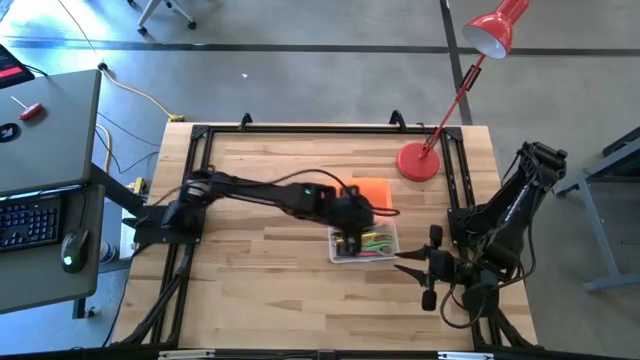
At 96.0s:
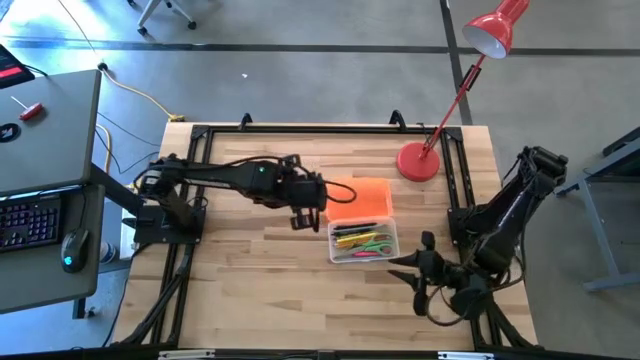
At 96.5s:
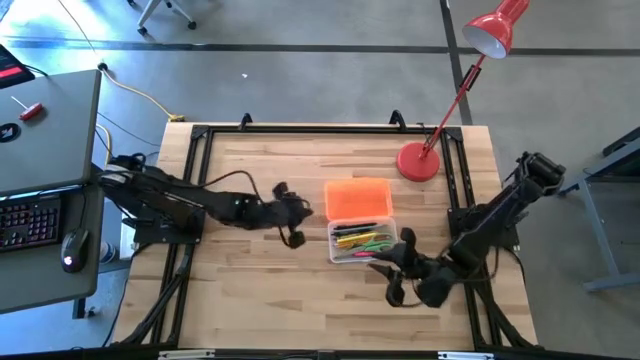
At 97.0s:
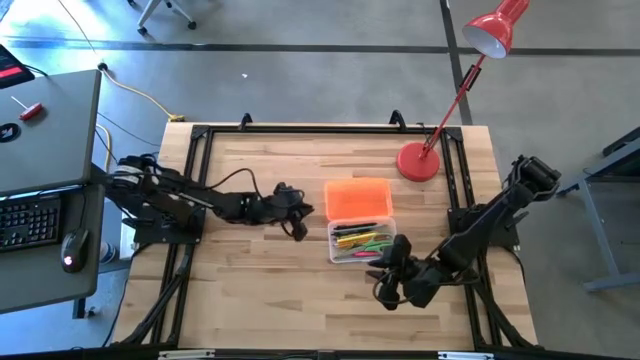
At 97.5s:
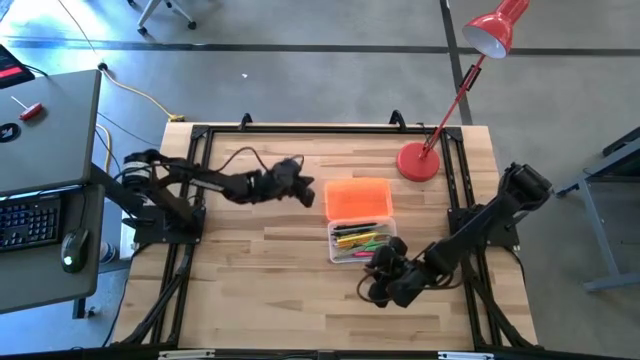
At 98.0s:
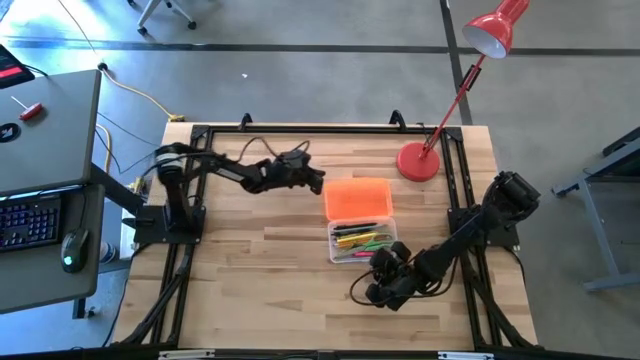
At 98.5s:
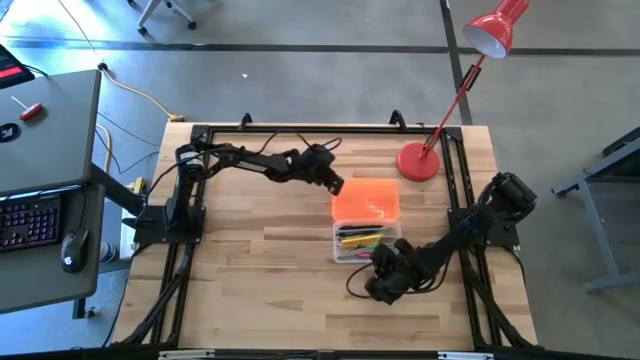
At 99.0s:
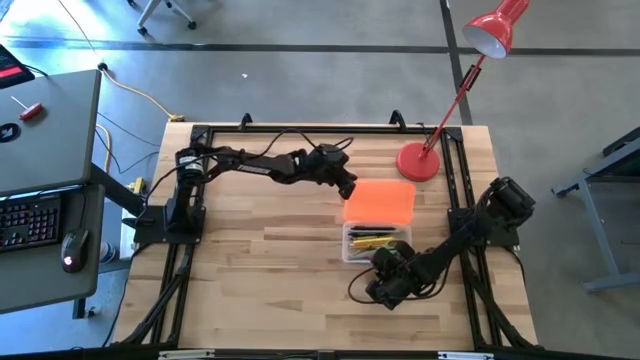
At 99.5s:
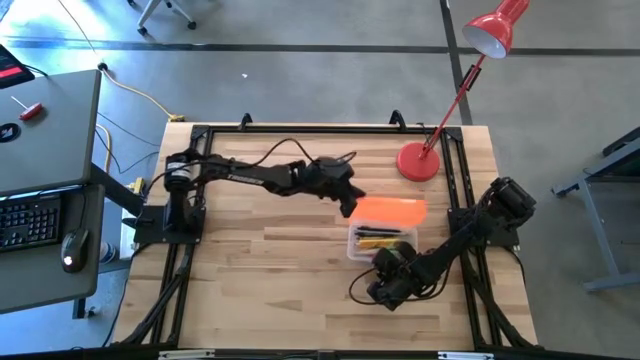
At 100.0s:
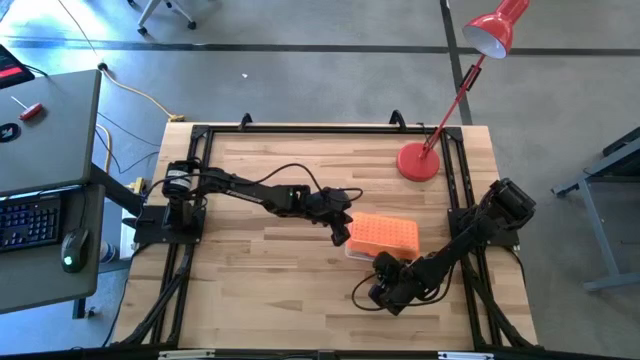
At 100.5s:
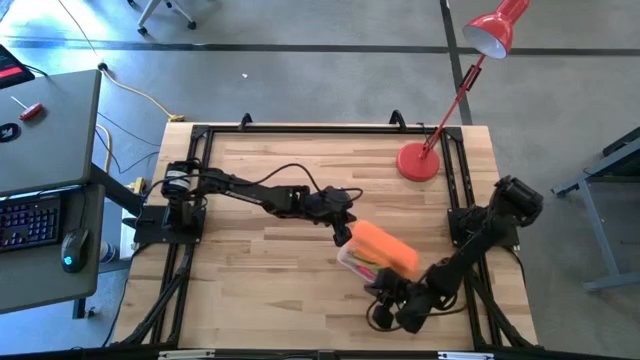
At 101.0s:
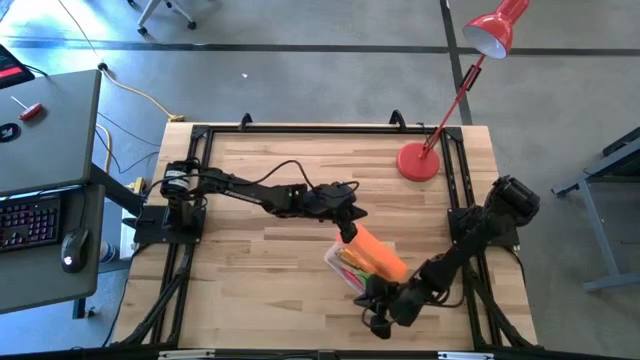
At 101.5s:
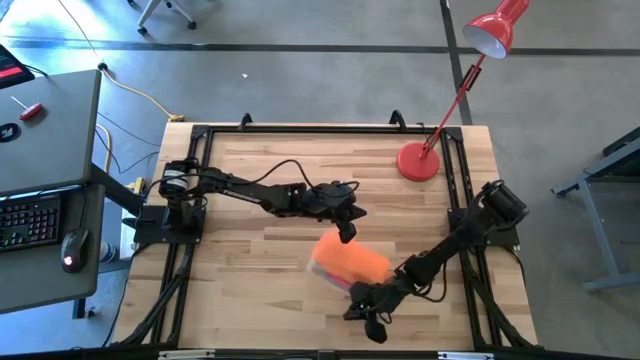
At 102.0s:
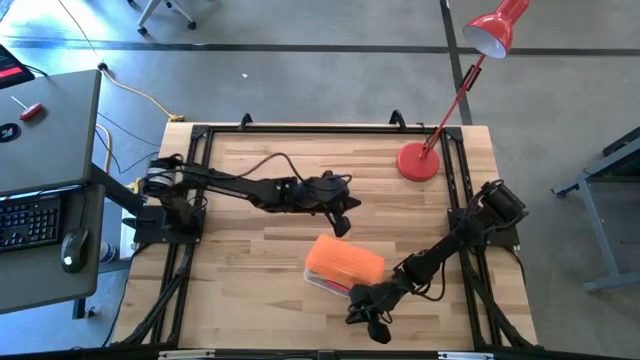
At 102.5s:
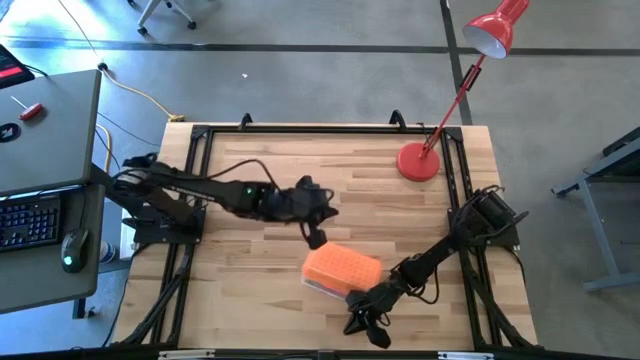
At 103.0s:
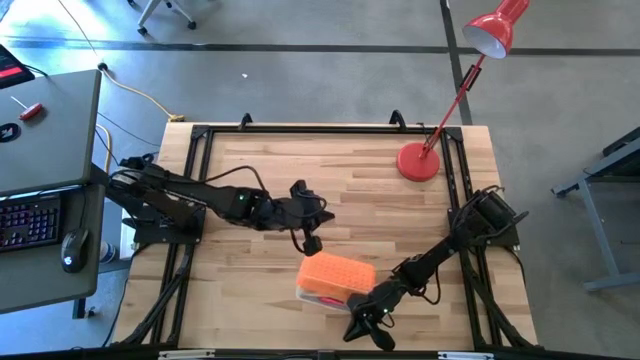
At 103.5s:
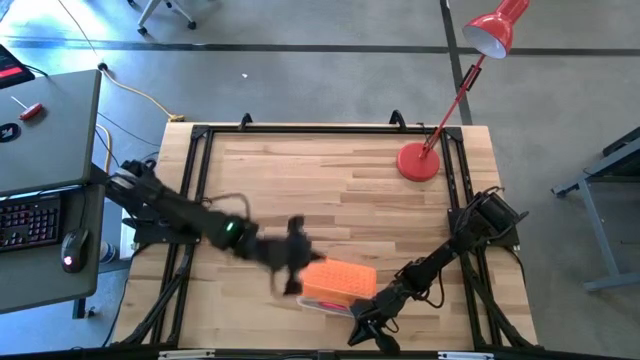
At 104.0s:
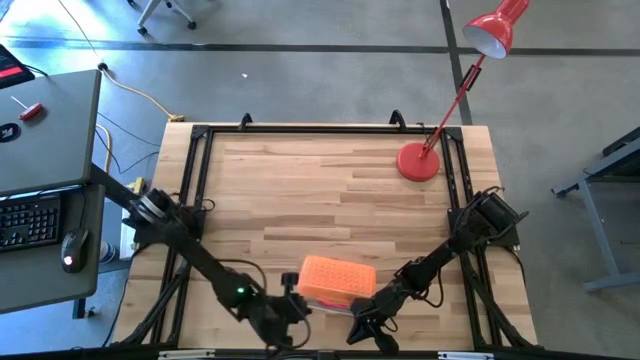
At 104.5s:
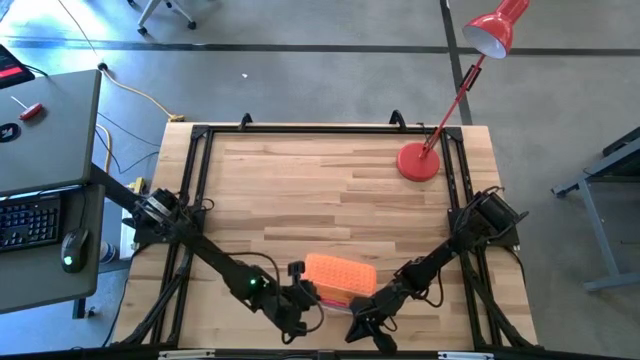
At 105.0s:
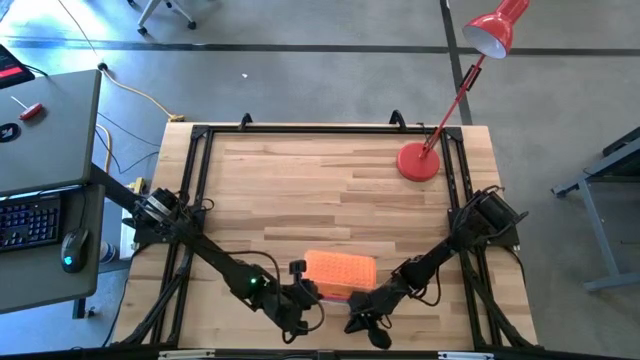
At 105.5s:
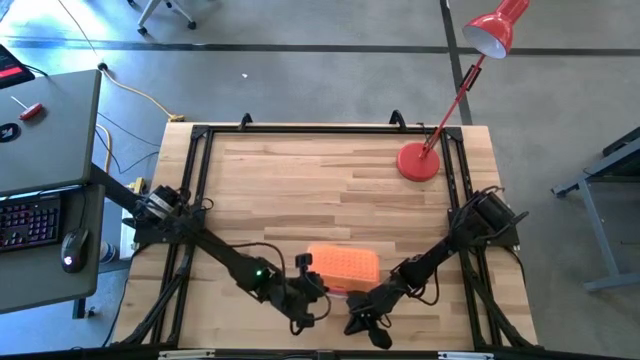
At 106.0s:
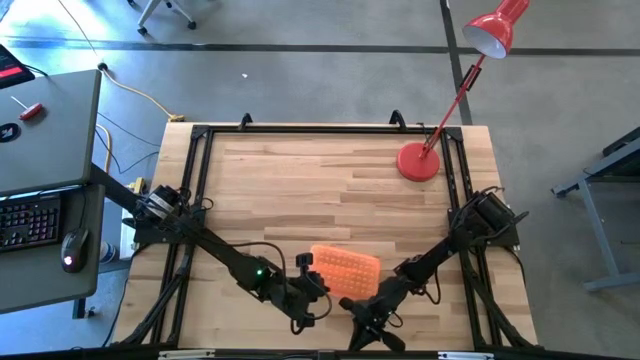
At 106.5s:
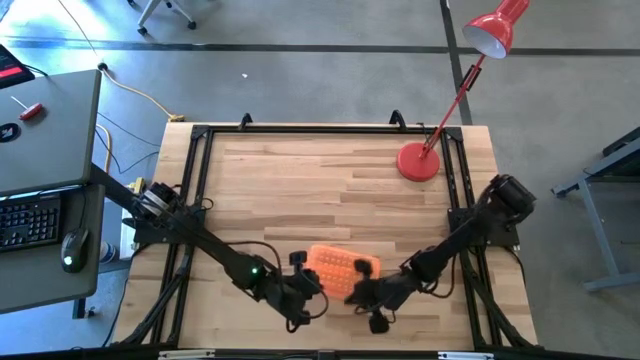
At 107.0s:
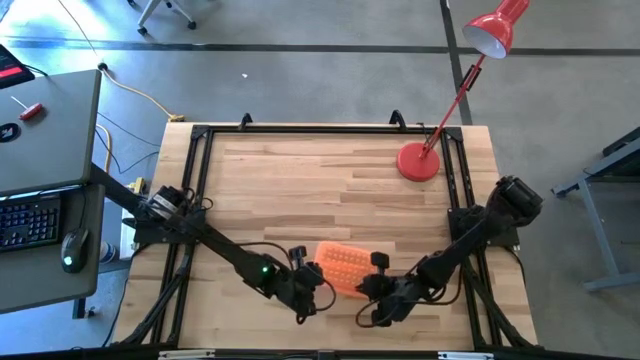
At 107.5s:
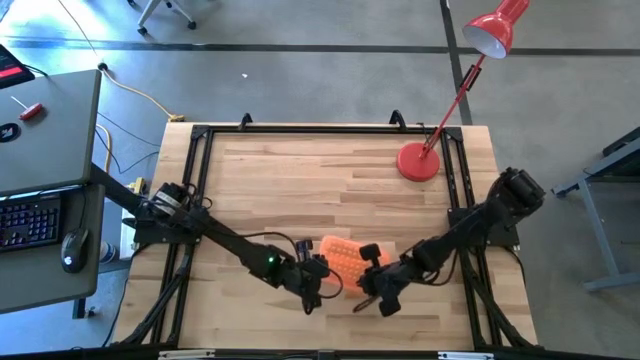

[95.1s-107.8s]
Task: Pick & place school supplies into a supply box
Close the supply box

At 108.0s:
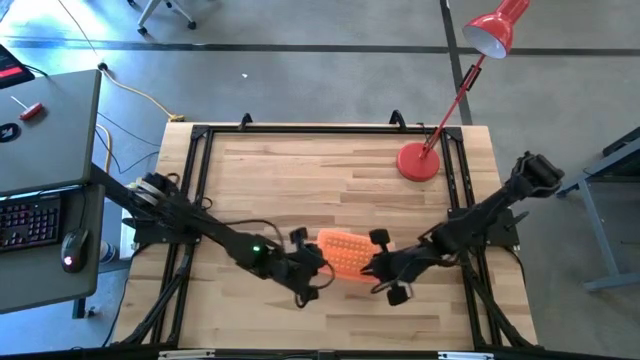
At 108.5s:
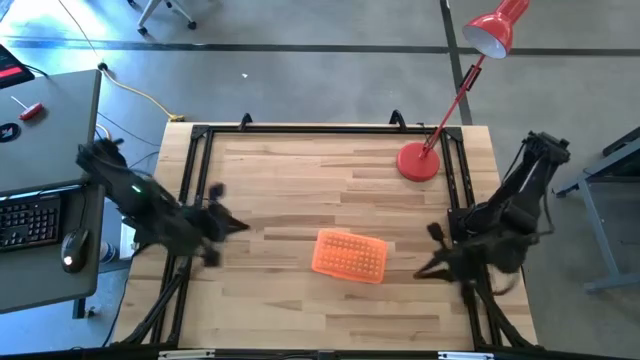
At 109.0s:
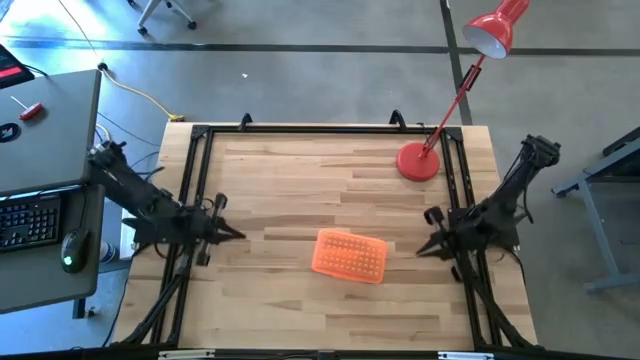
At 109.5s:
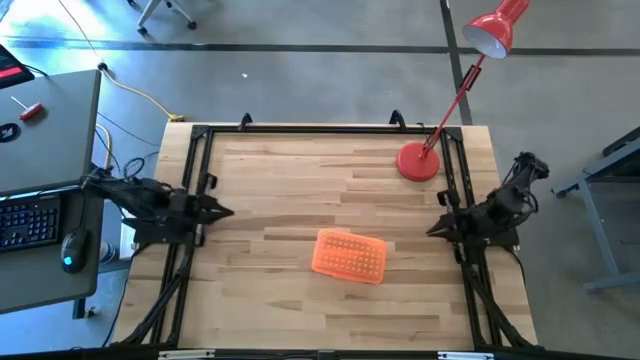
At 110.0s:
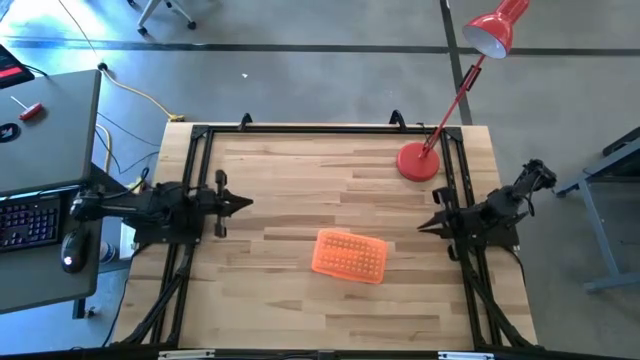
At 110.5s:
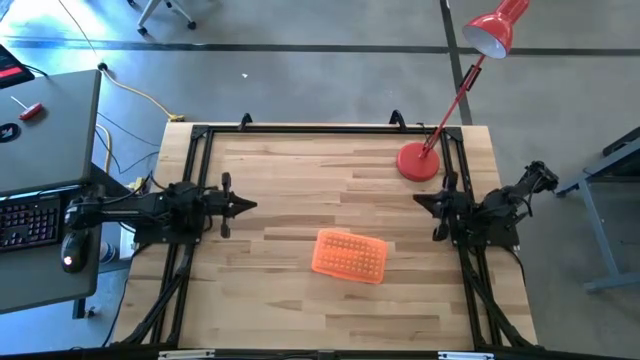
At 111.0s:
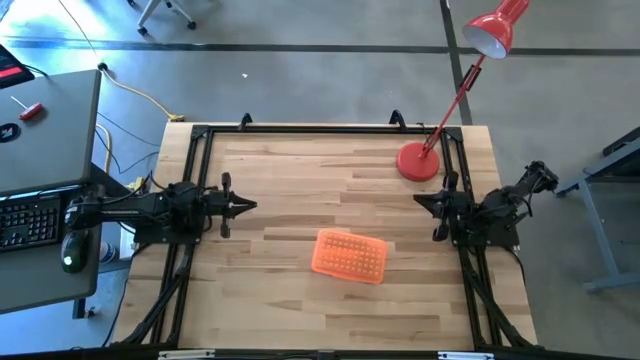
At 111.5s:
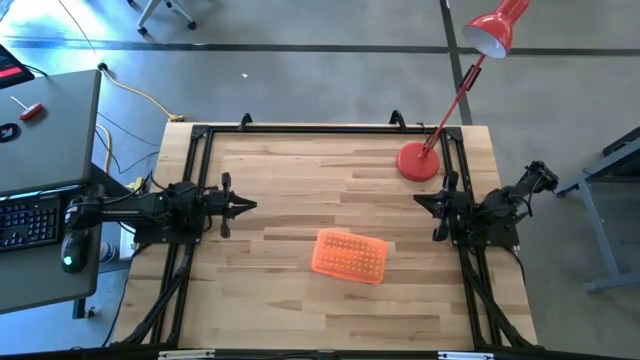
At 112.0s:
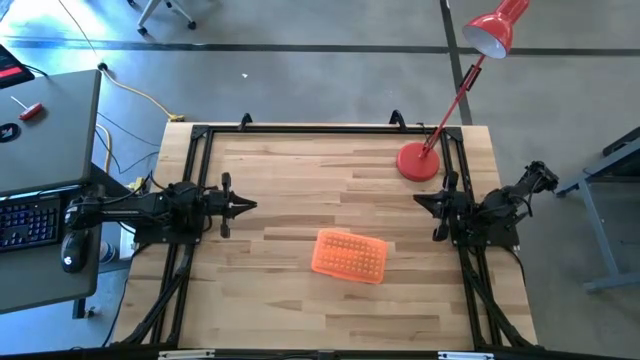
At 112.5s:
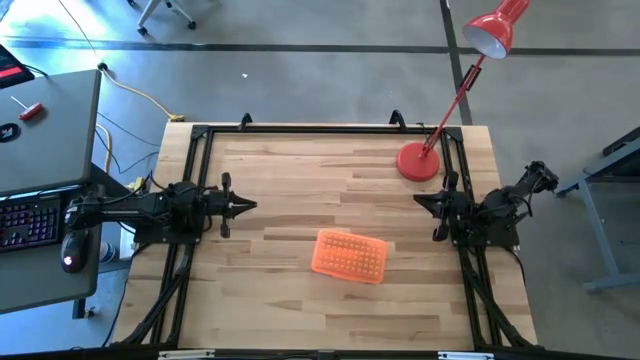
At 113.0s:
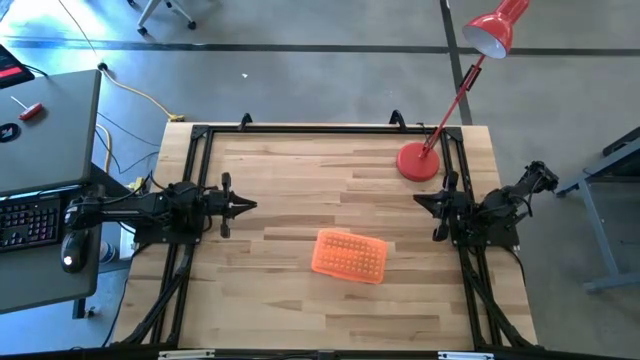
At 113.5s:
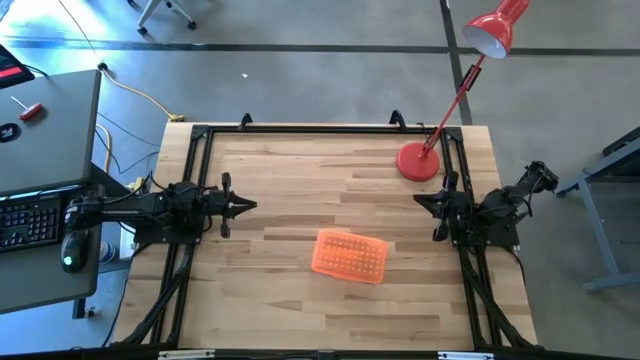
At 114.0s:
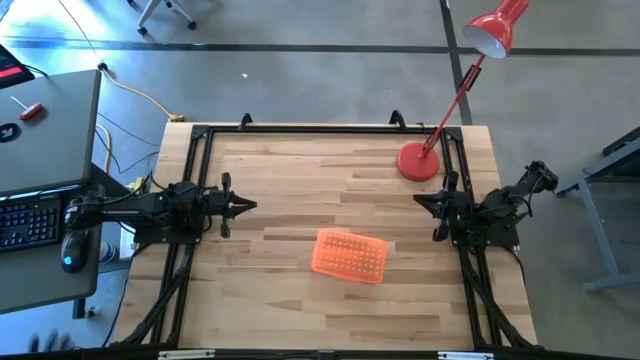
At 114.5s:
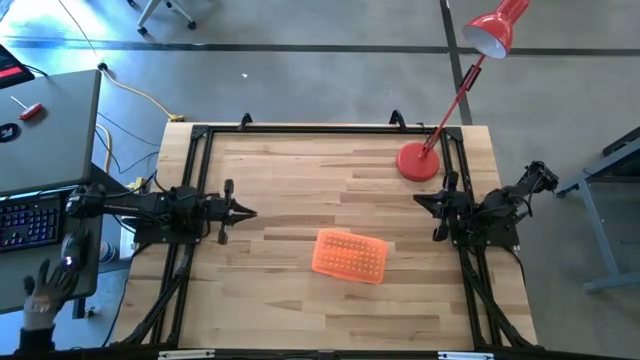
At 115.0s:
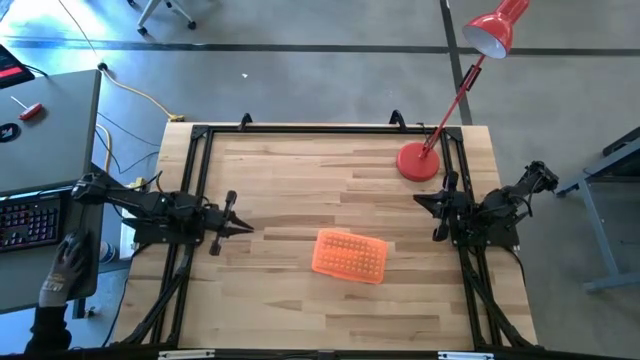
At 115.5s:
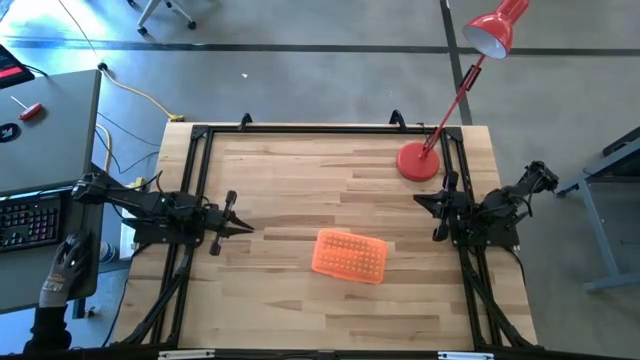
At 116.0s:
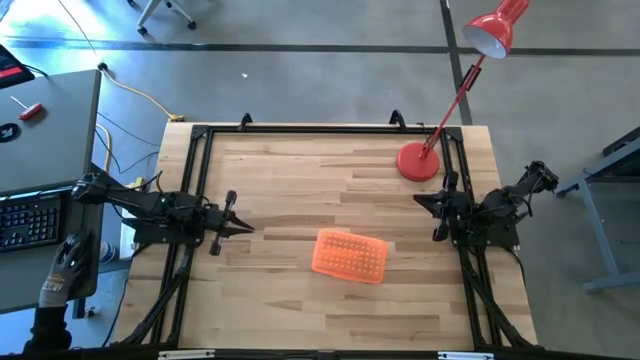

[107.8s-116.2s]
Return to Home Position
